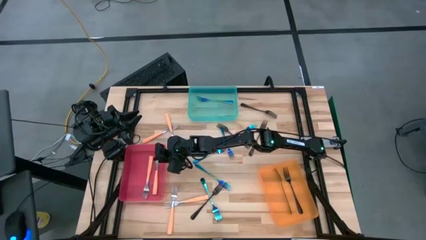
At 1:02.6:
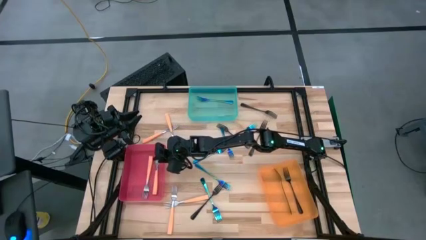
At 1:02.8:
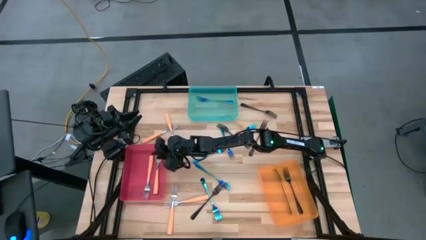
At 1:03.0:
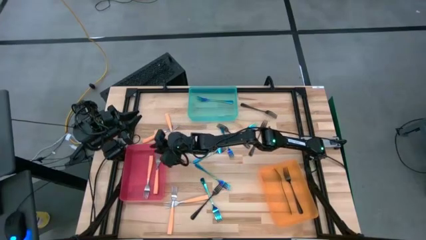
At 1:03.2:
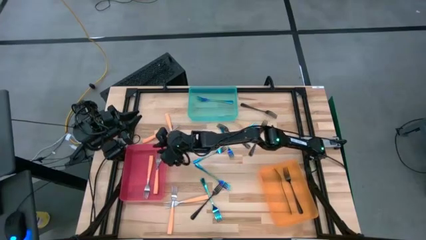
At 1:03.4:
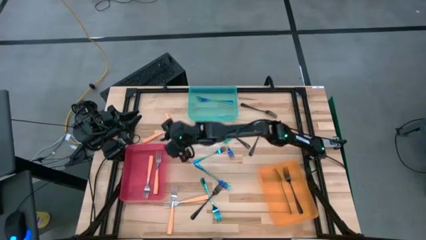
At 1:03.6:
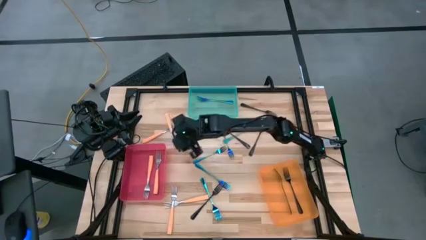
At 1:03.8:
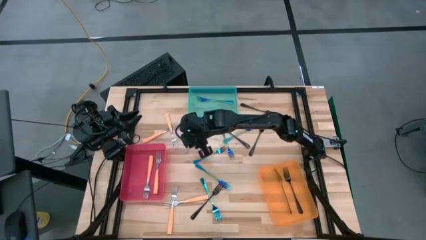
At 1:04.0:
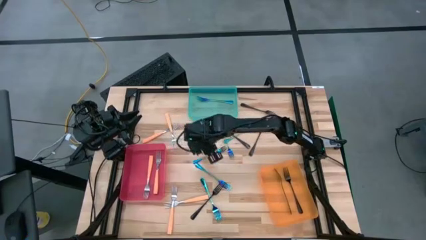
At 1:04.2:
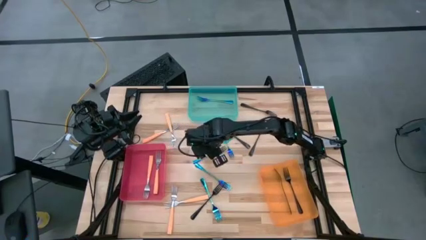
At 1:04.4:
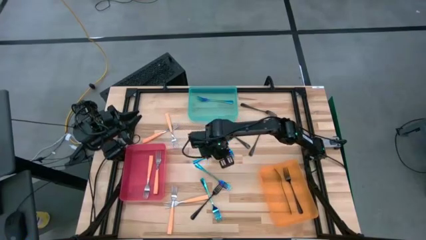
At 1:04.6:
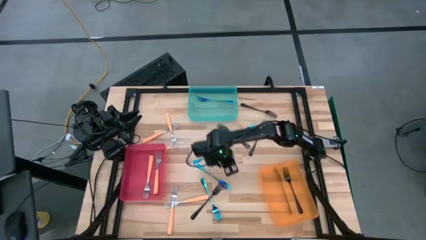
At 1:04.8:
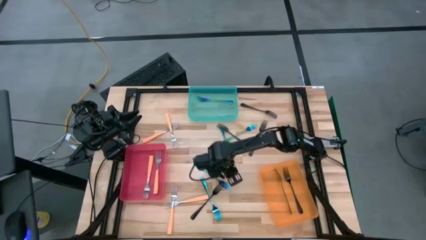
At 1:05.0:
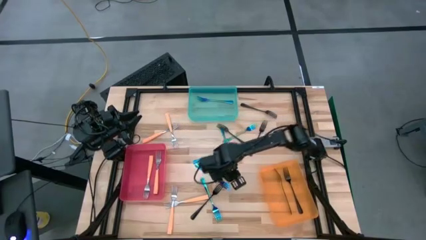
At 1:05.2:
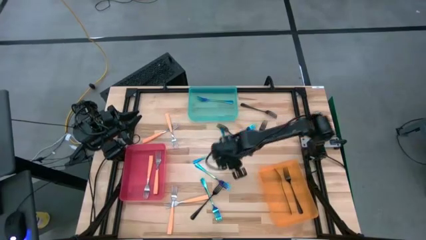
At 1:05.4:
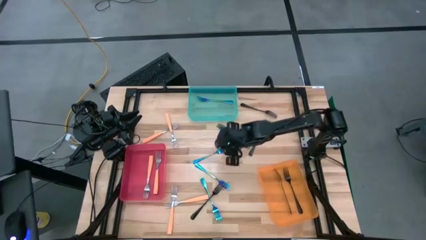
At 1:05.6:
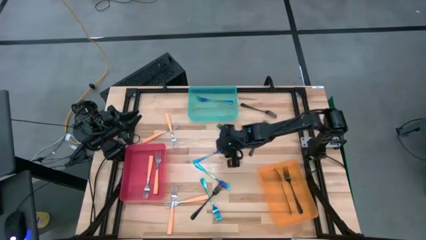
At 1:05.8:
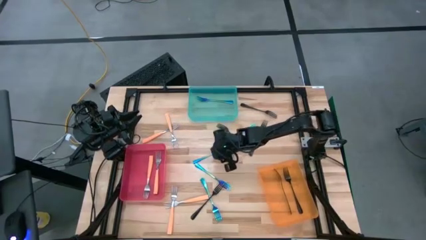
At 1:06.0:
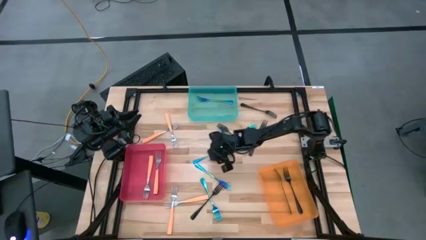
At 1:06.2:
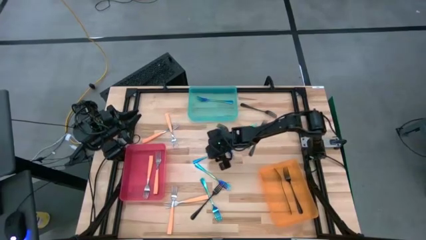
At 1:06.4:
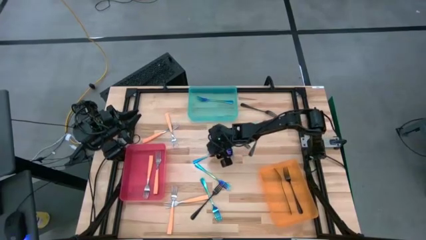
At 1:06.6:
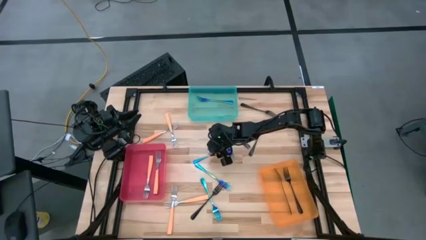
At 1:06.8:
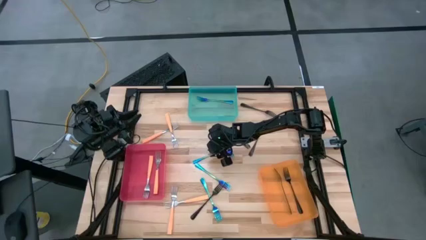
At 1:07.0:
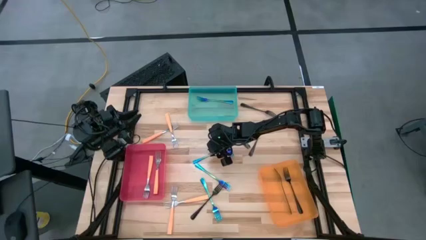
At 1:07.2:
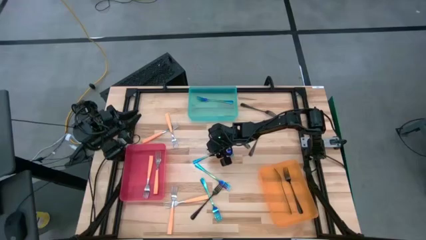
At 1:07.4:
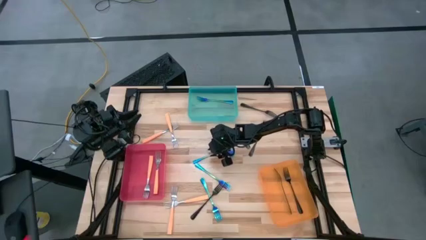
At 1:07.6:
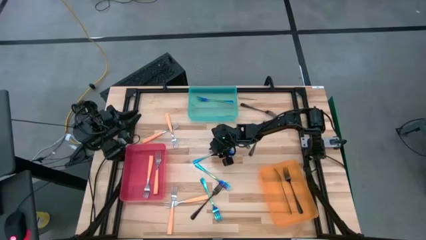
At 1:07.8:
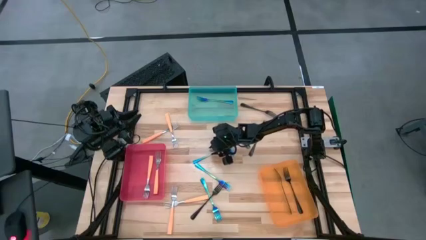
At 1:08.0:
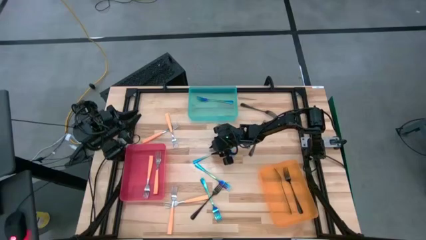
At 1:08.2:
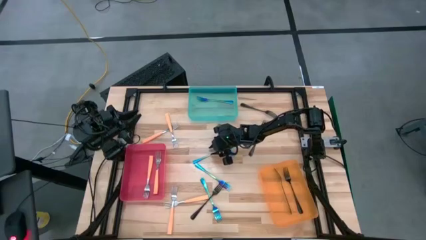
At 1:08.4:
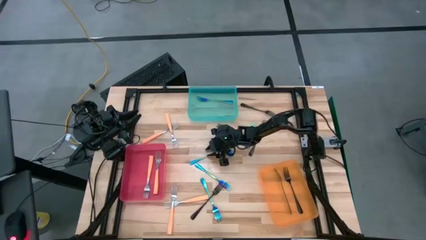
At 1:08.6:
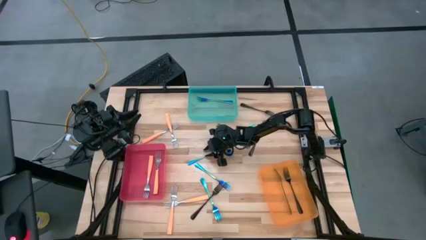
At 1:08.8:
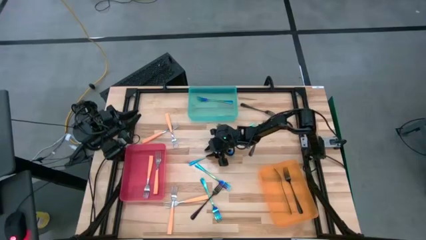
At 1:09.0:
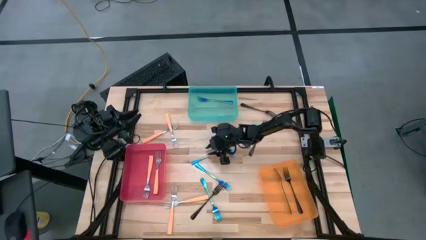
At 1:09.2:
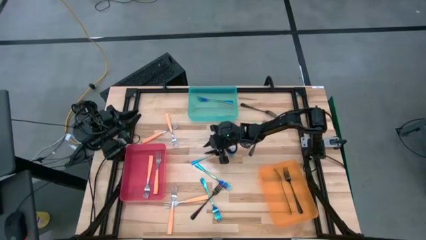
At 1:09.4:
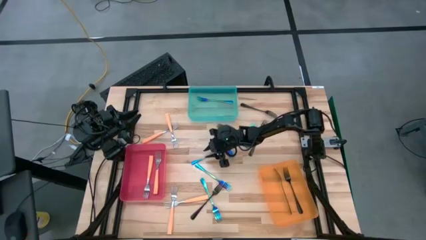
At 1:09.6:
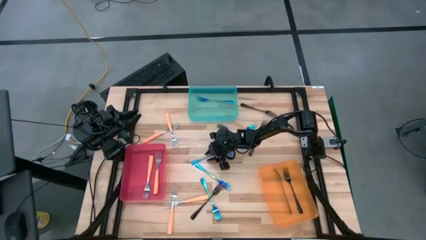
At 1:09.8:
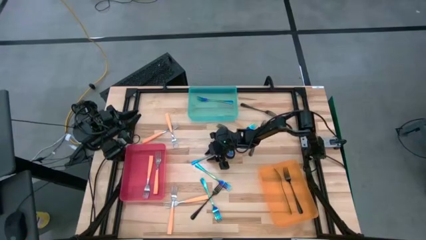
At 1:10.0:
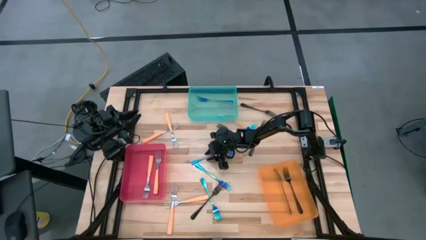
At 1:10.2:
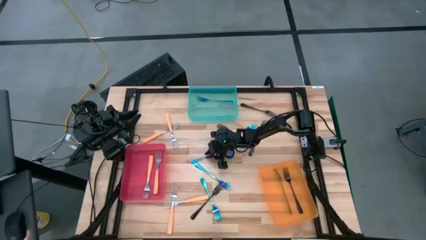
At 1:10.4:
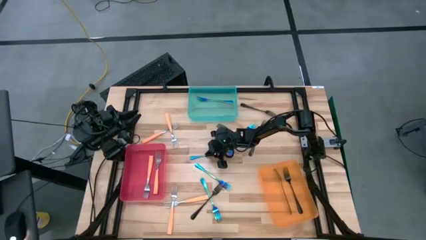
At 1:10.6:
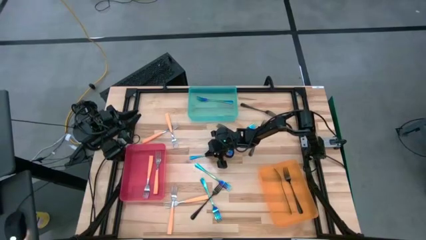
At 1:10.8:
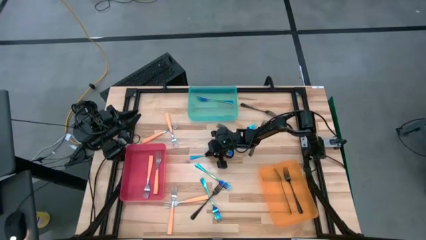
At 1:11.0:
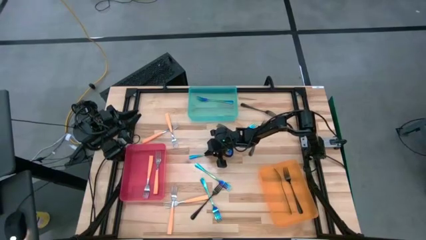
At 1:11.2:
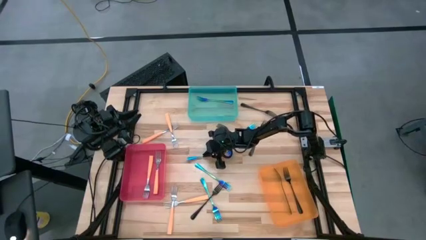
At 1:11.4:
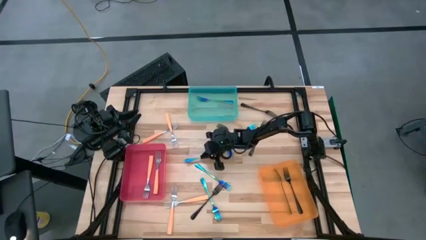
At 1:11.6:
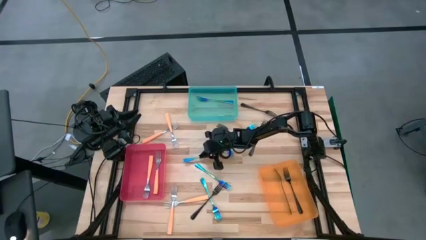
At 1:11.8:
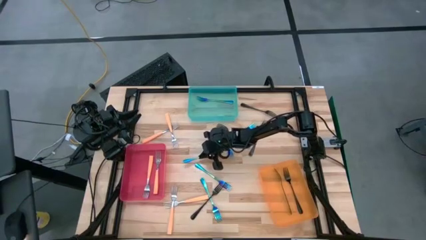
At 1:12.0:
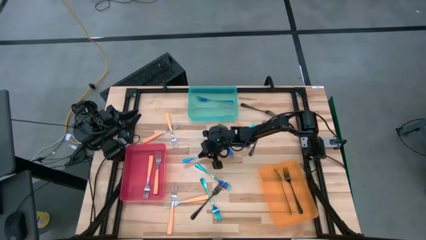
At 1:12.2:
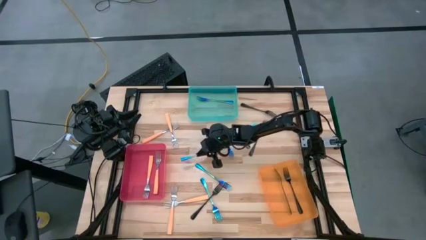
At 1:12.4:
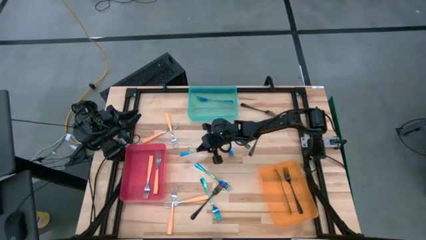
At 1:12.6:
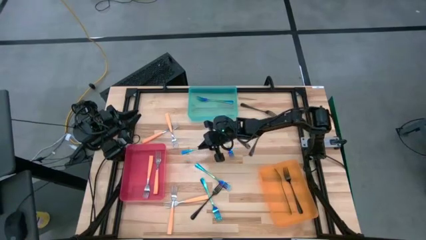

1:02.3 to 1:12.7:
Task: Sort silverware by color (type)
Put the blue fork into the blue bin

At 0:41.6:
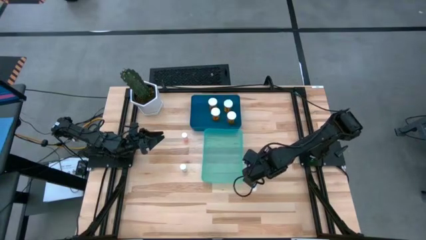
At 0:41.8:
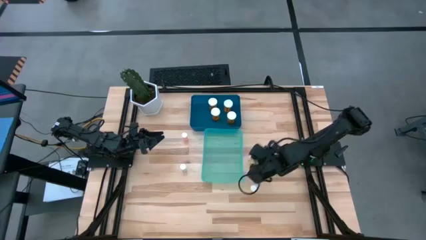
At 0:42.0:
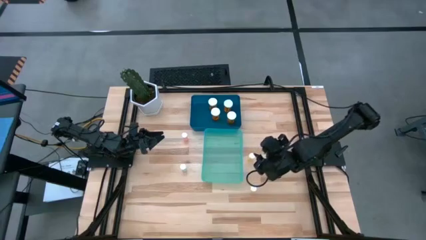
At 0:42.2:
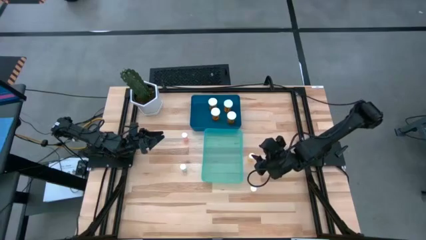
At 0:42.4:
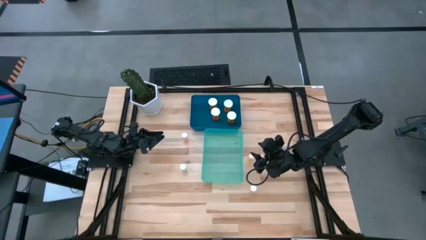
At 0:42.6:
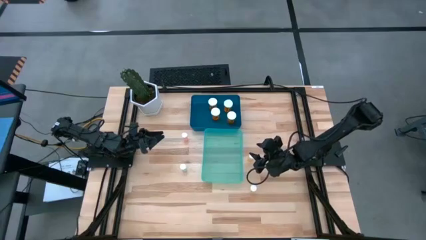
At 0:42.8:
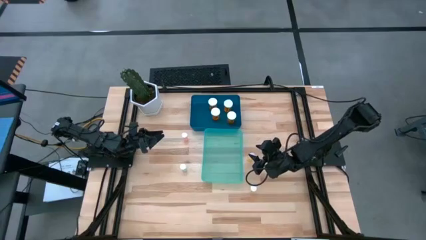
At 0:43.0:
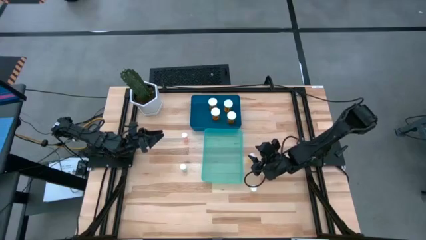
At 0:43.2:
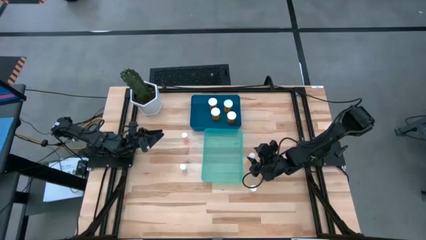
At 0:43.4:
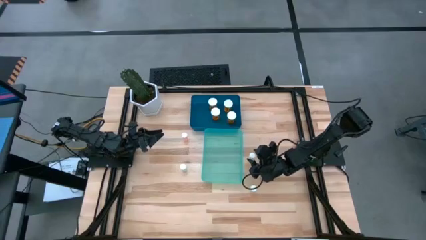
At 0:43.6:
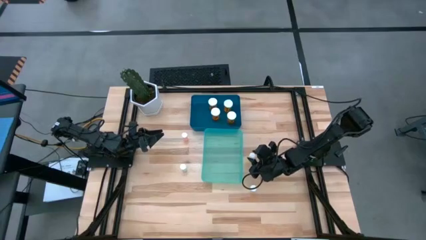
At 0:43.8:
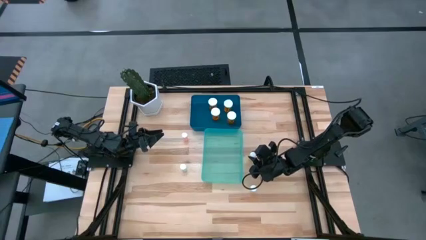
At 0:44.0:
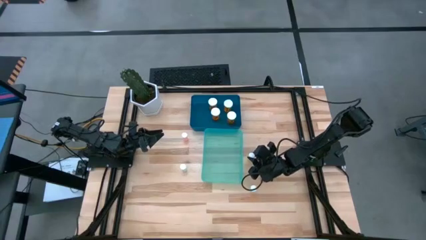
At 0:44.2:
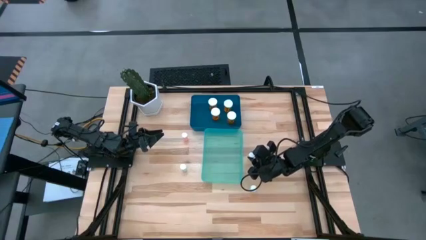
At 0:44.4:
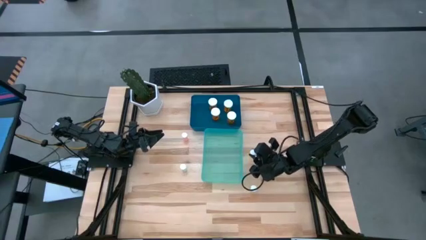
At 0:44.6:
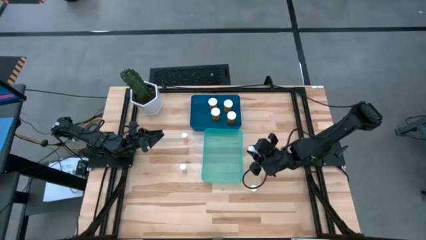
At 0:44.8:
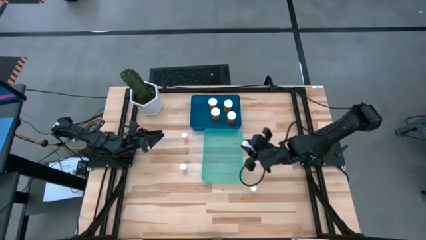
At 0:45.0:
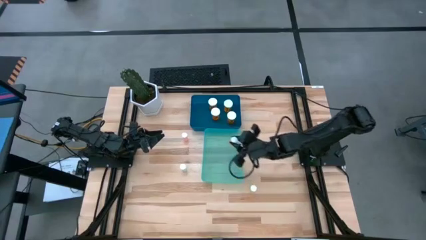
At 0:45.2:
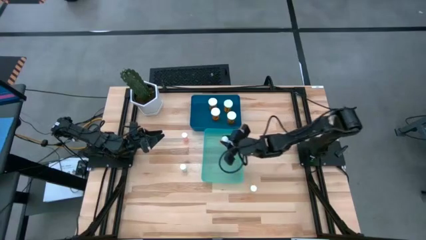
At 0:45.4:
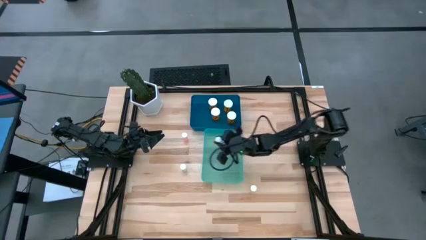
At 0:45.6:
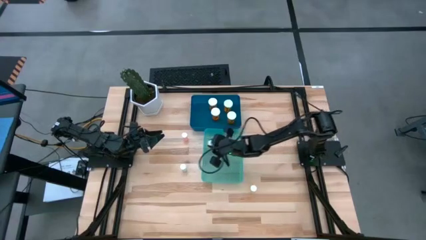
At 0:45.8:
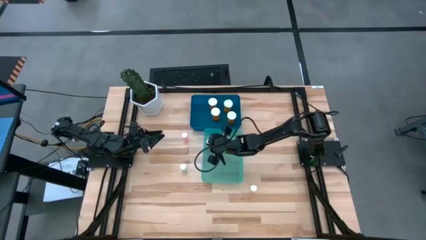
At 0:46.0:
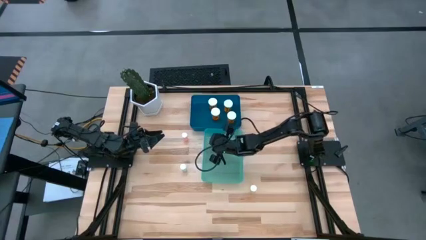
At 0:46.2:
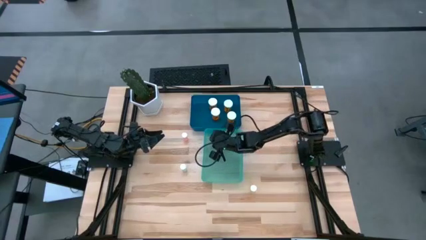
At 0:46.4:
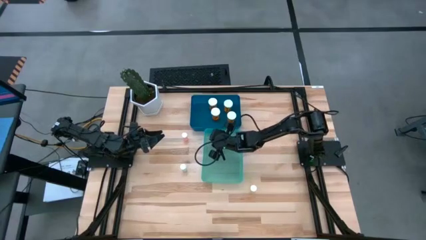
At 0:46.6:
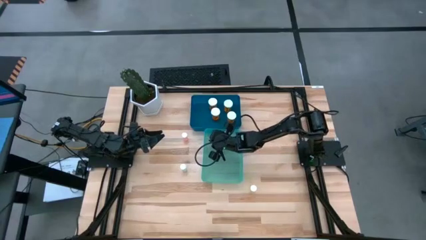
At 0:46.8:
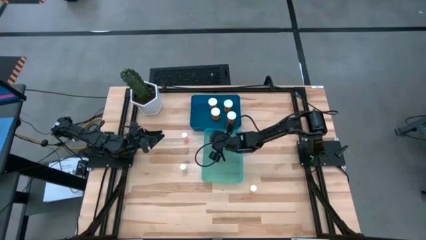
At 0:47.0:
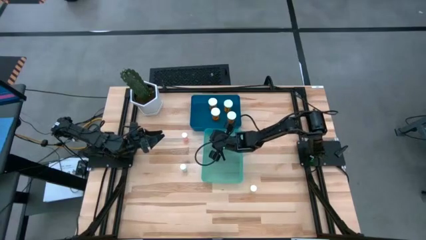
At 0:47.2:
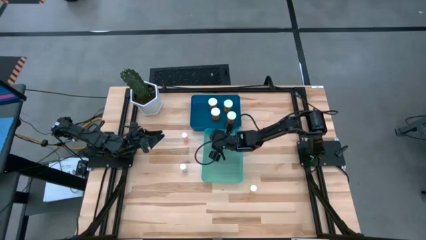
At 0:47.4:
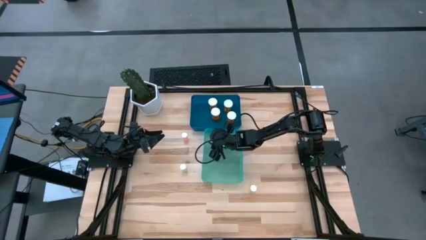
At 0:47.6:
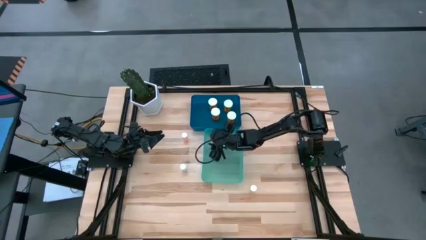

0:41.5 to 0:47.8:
Task: Pick and place medicine bottles into bin by pill shape (circle, oval)
Put the small orange pill bottle into the green bin
